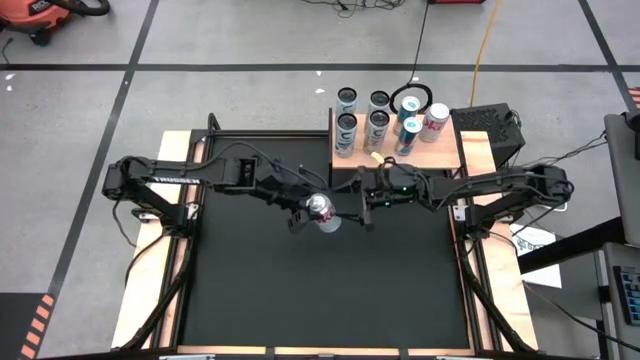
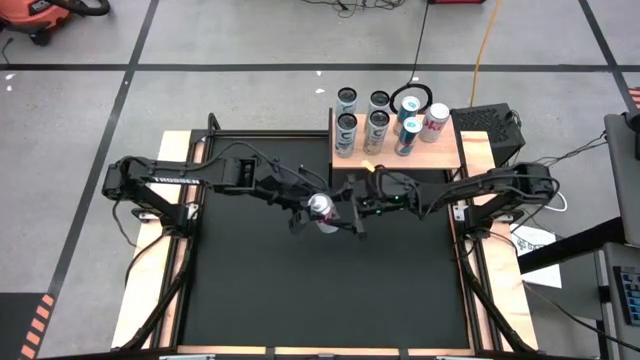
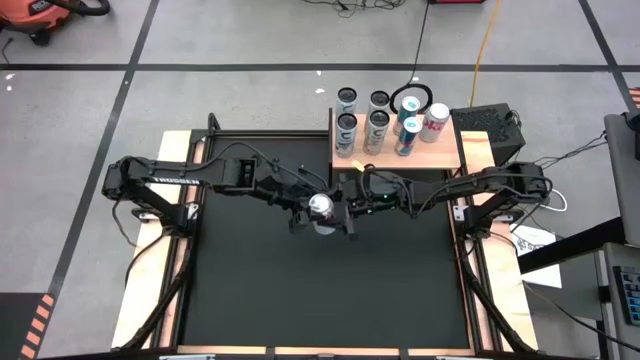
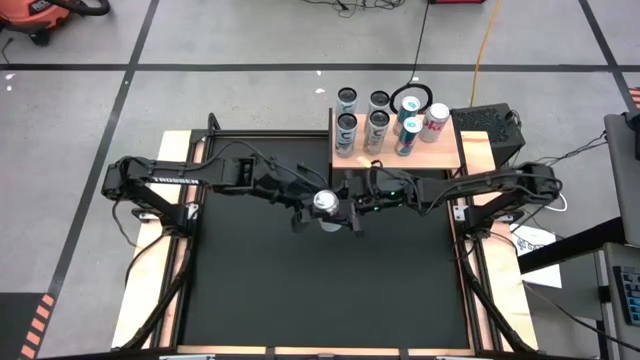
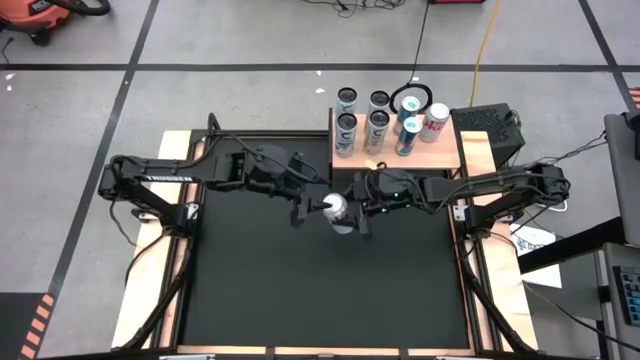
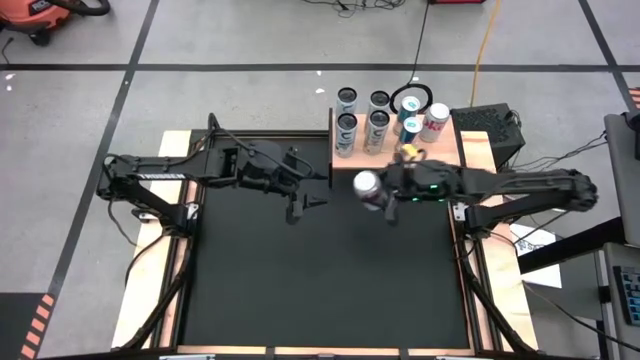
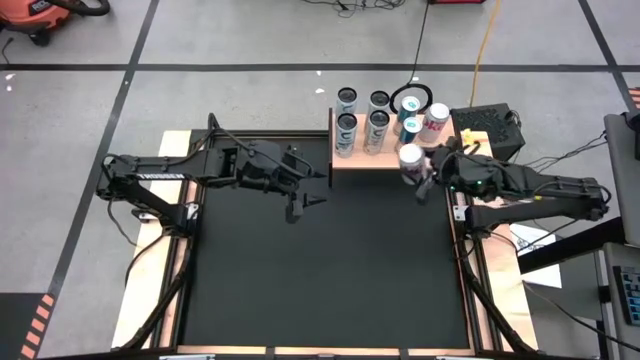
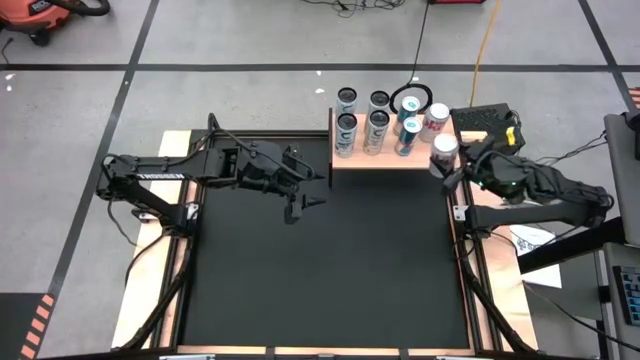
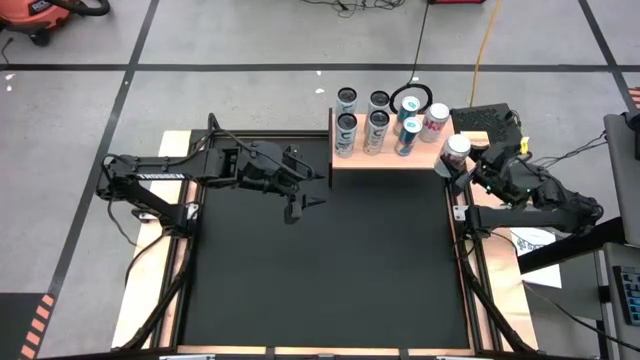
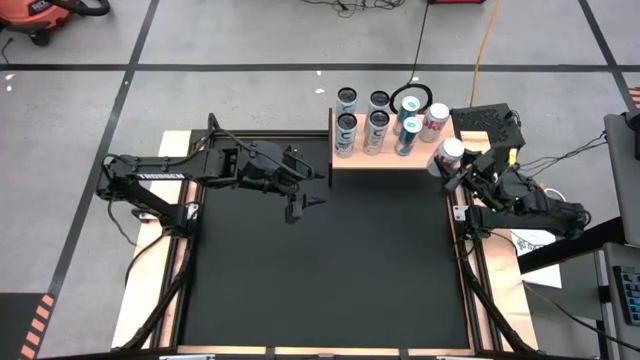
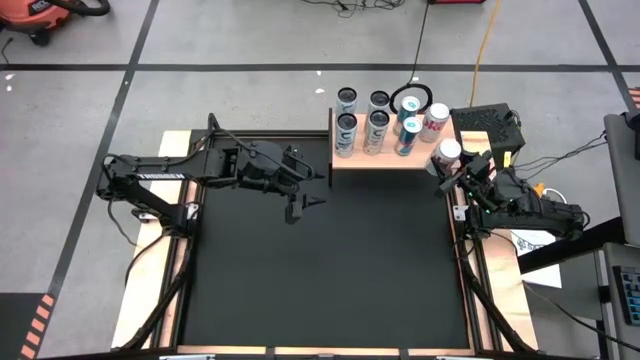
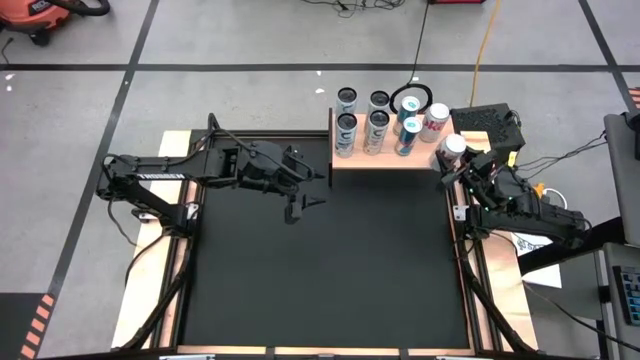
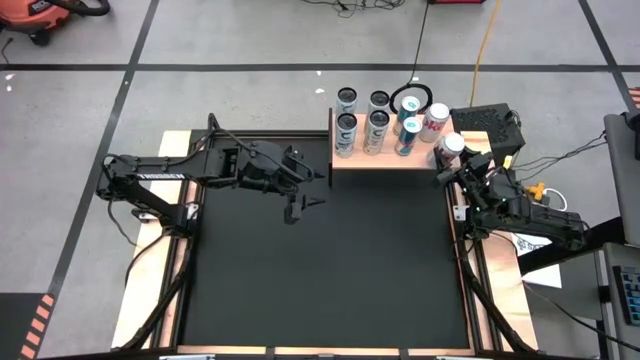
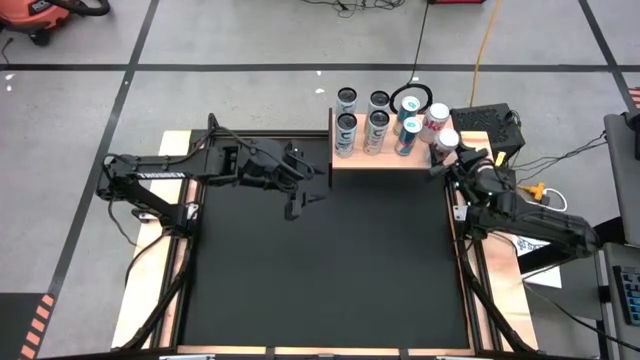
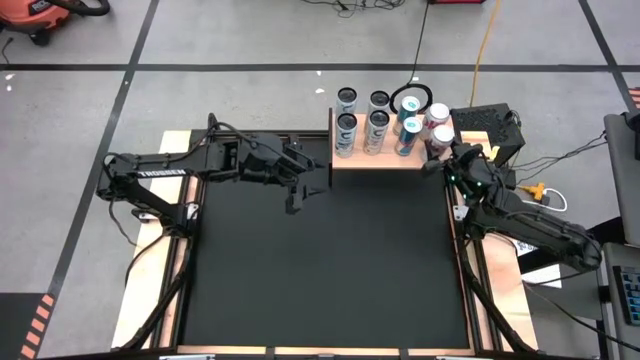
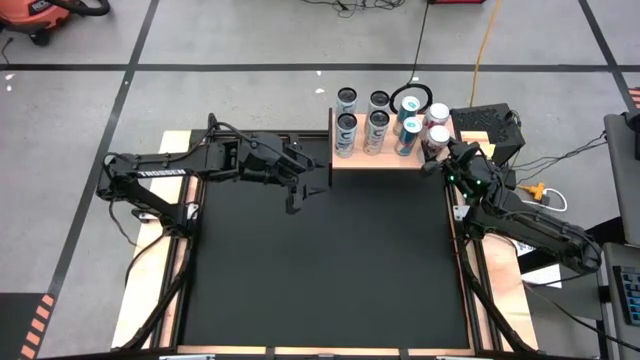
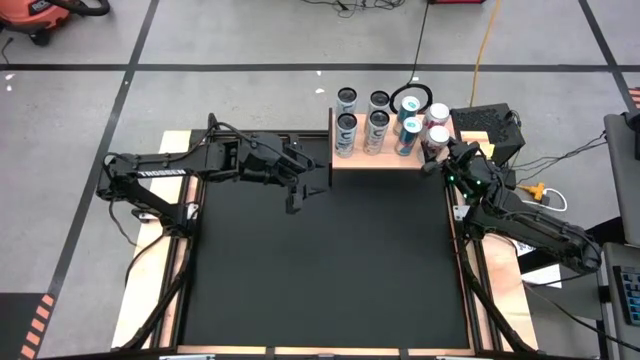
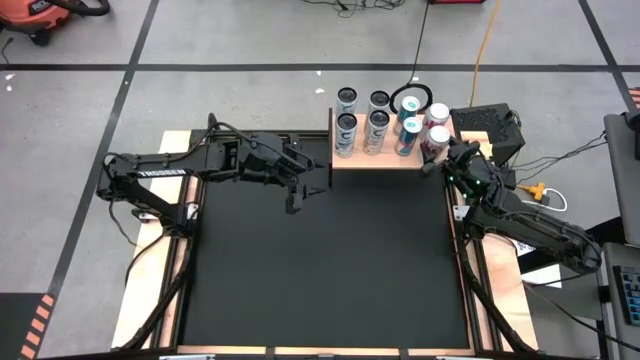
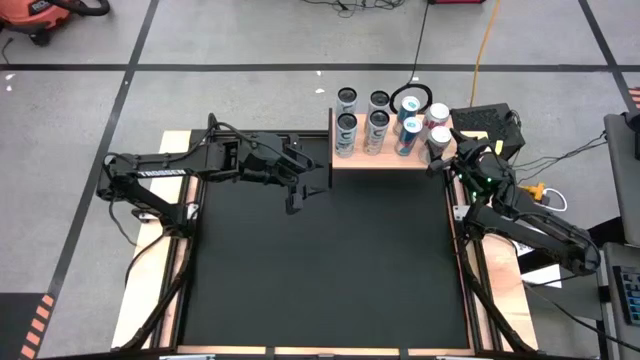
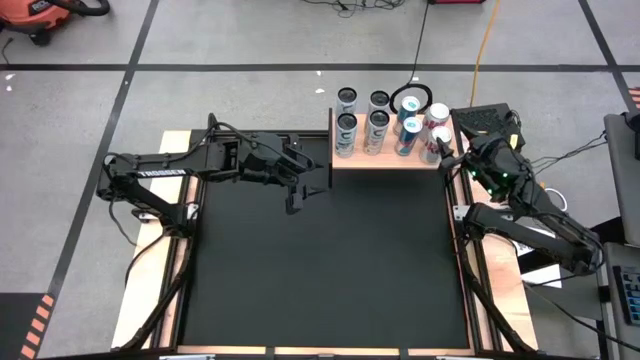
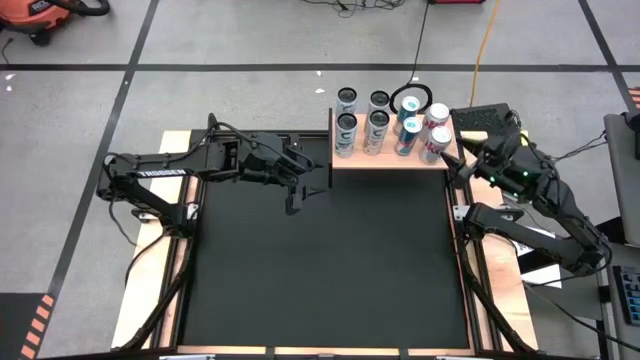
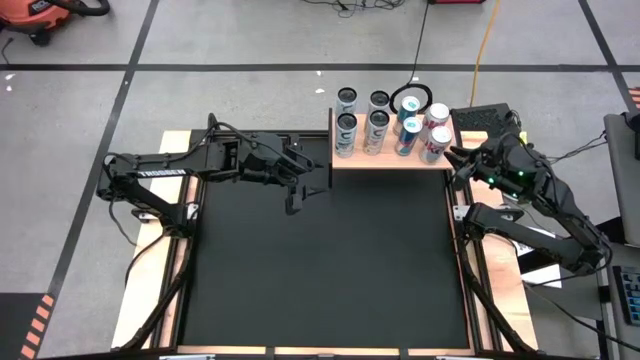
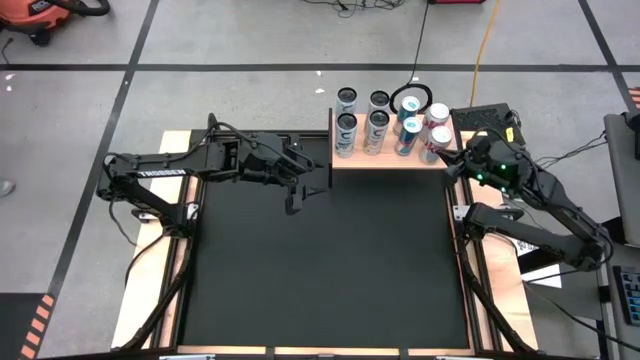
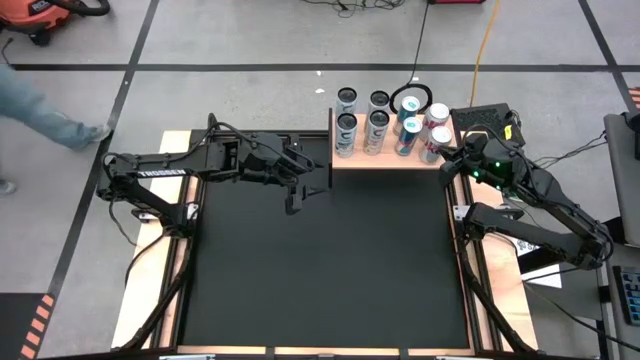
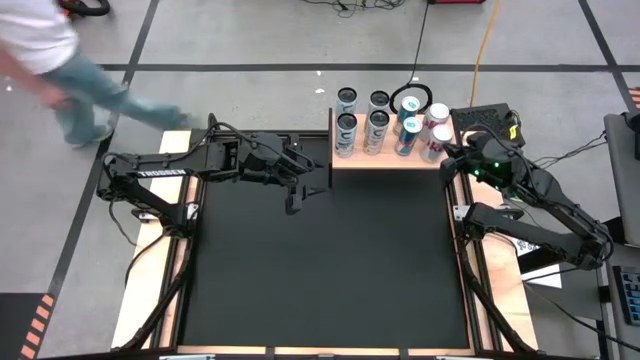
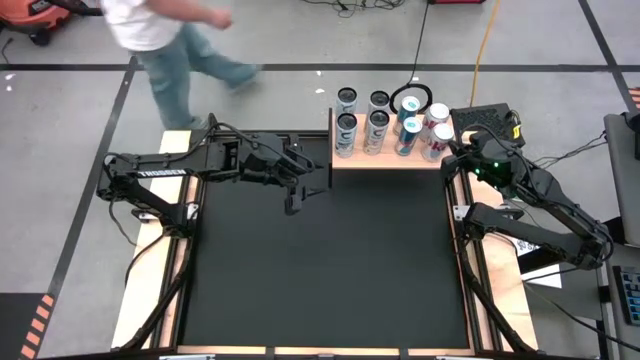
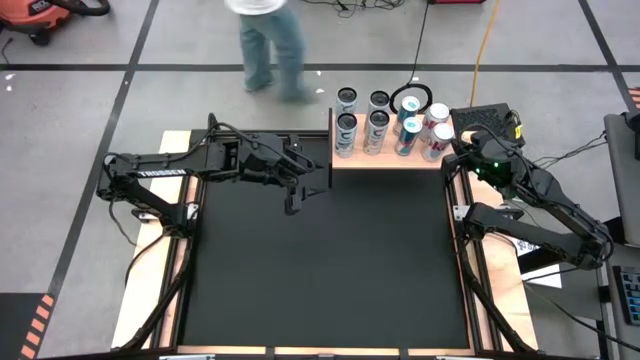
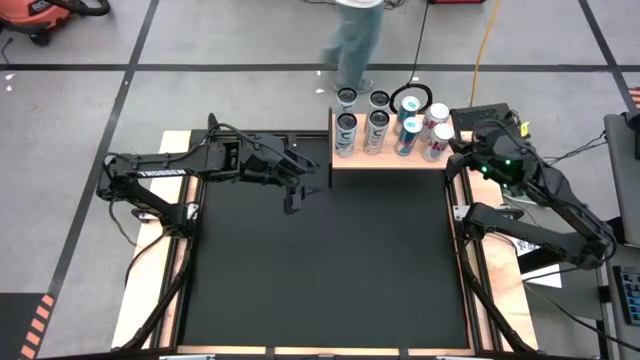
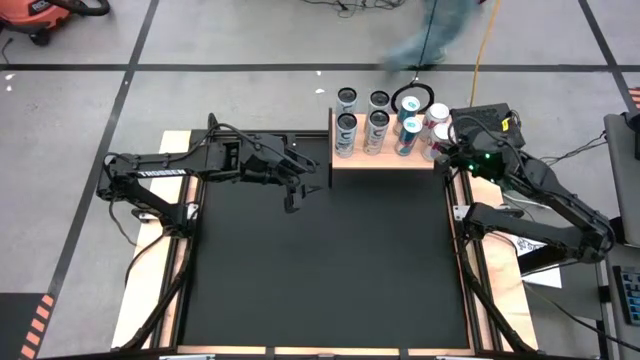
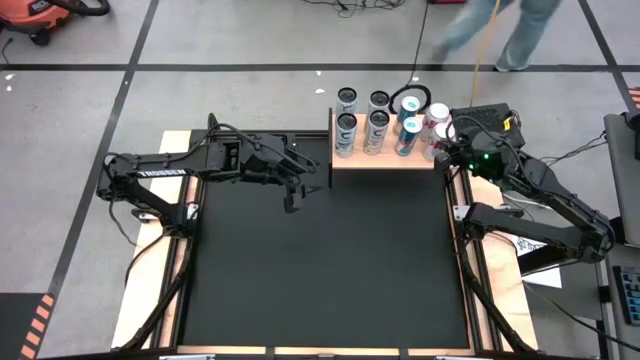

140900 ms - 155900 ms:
Task: Place canned beverage on shelf
Put the red-silver soda can on the shelf aligned with the other red-silver soda can

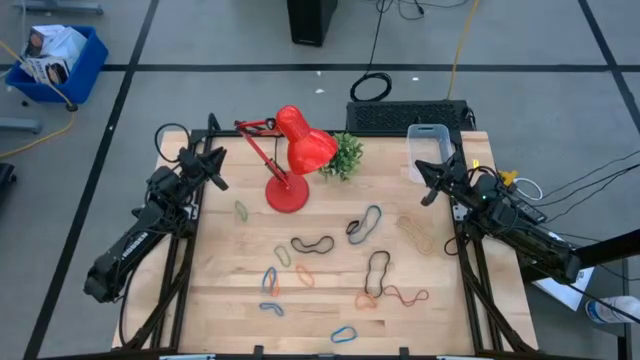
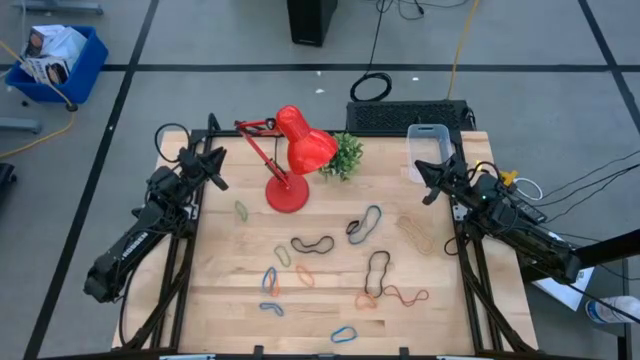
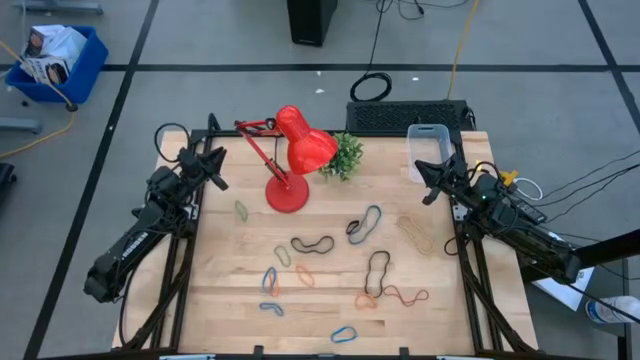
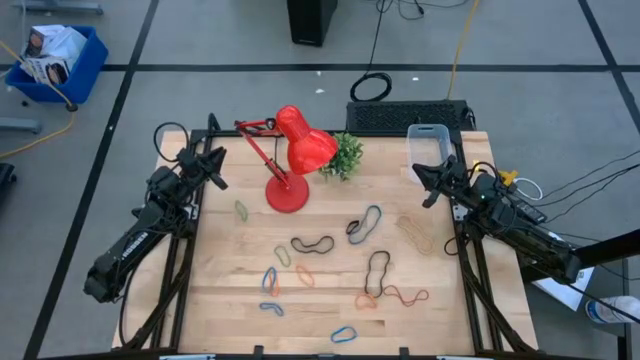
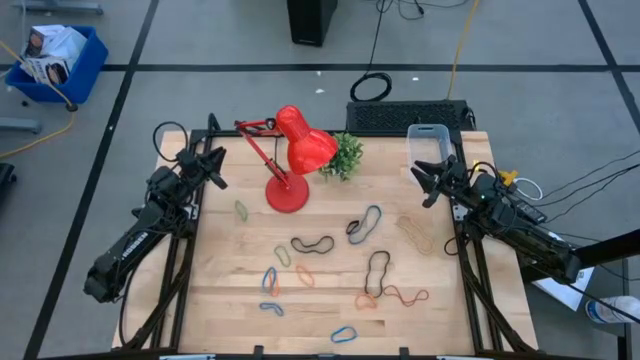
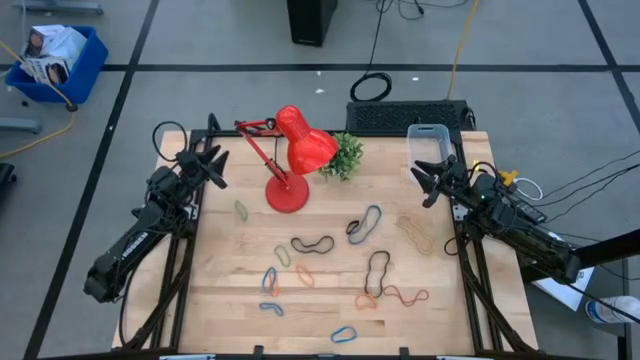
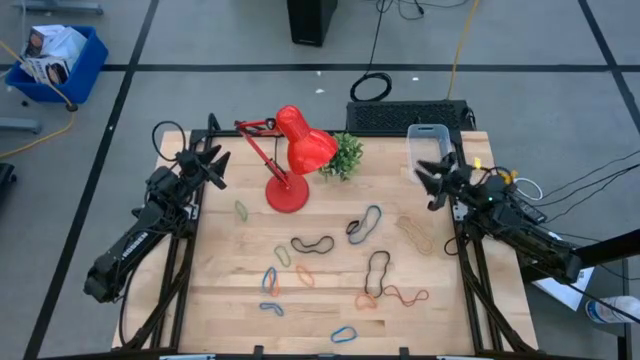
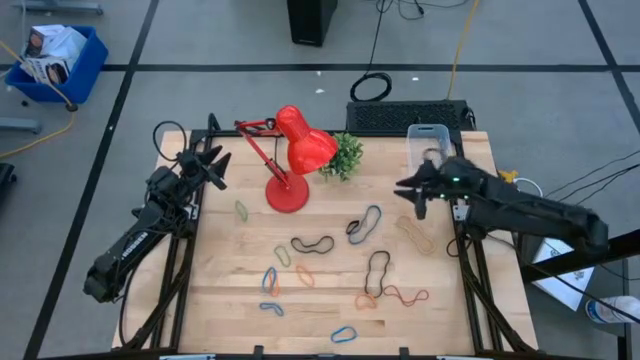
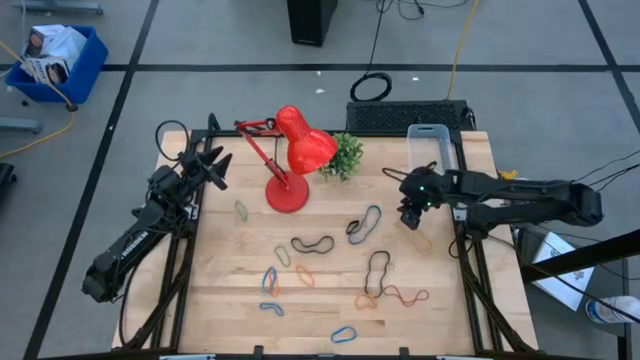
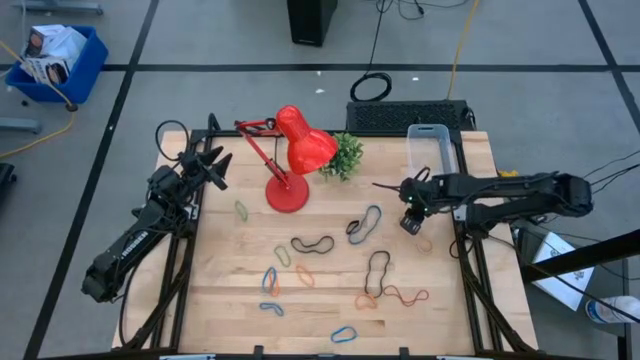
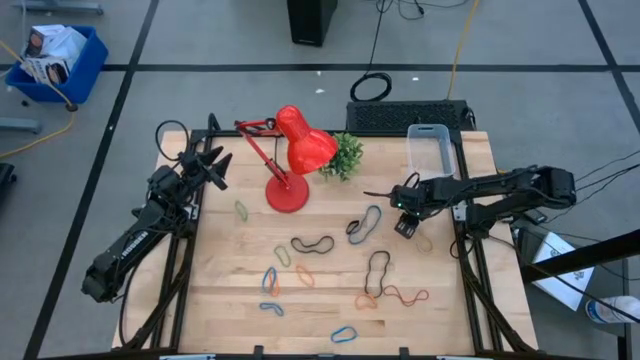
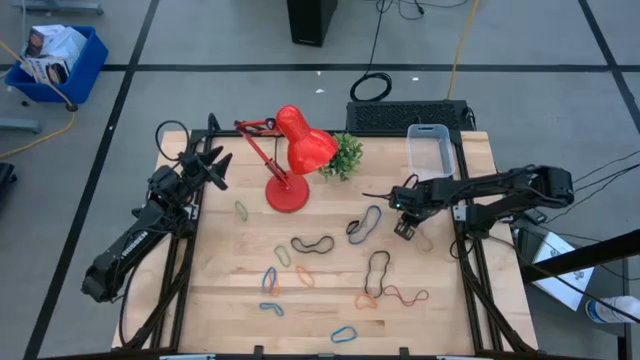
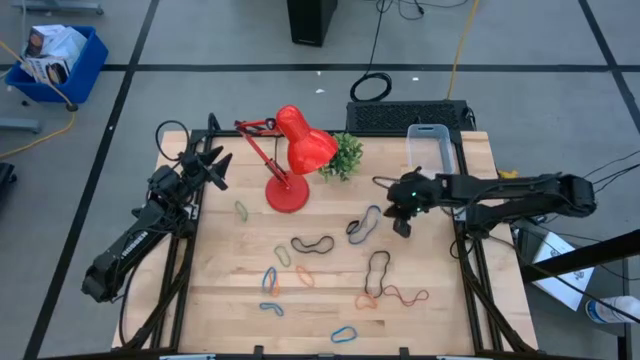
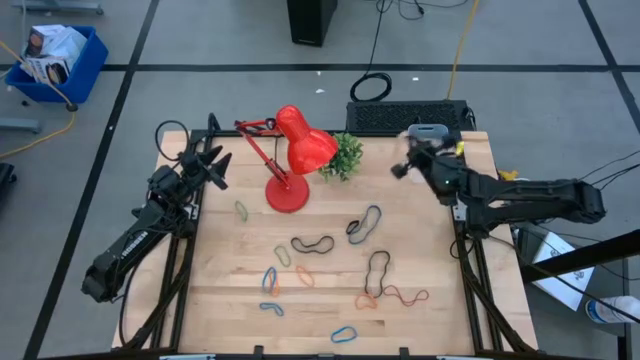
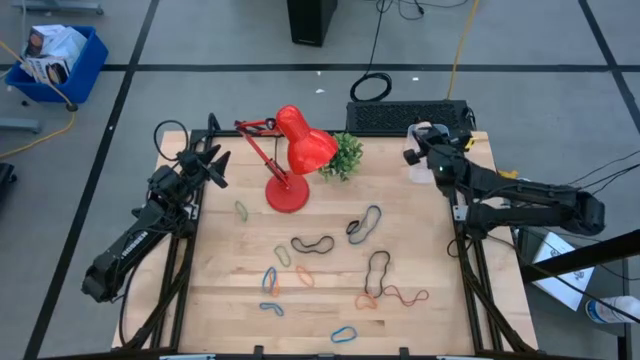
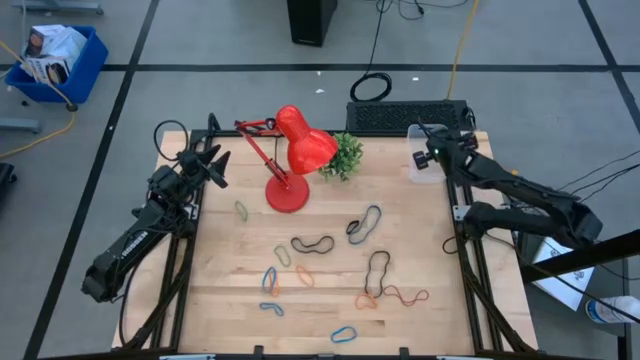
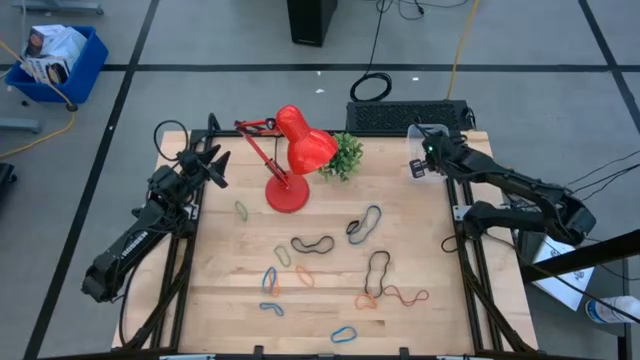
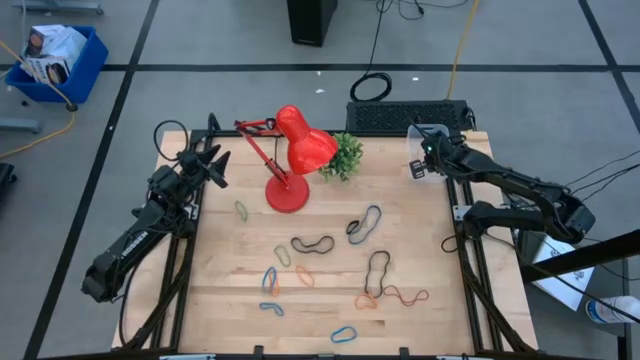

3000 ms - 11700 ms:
Task: Pick and place rubber bands into bin
Put the white rubber band into the transparent bin
